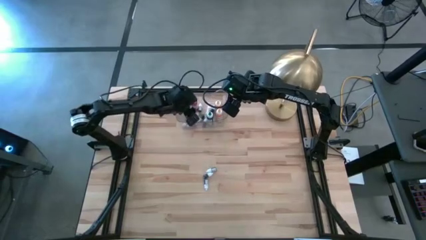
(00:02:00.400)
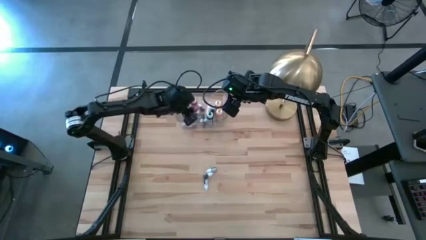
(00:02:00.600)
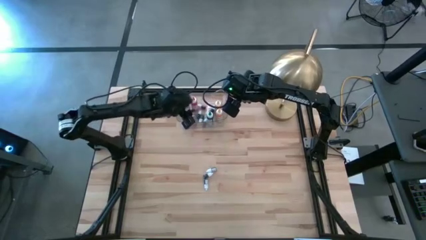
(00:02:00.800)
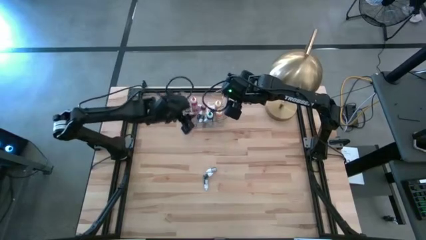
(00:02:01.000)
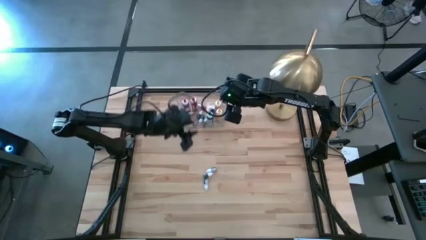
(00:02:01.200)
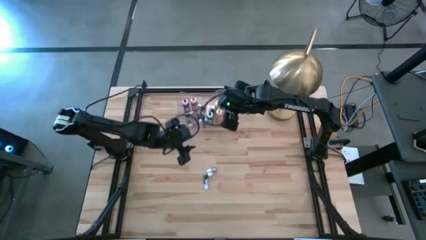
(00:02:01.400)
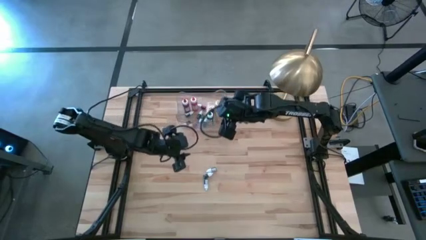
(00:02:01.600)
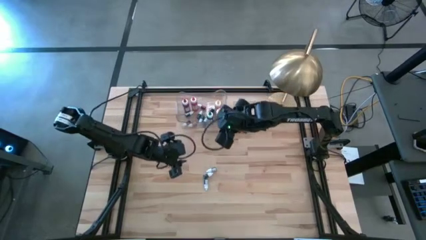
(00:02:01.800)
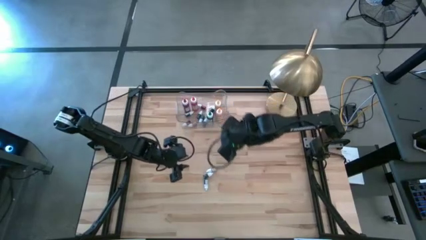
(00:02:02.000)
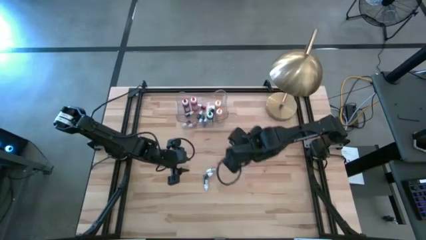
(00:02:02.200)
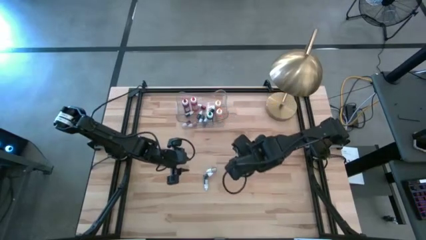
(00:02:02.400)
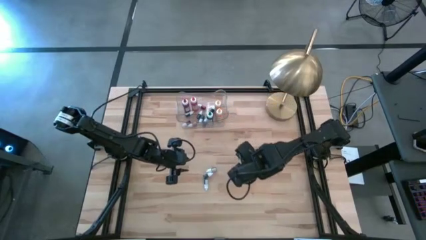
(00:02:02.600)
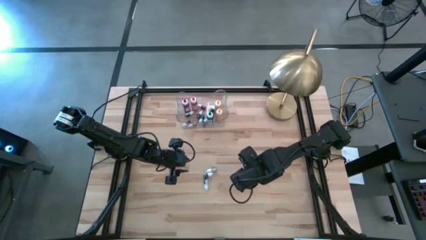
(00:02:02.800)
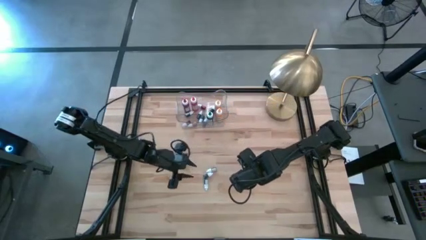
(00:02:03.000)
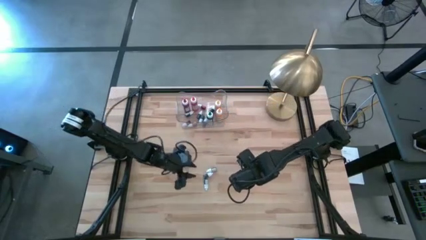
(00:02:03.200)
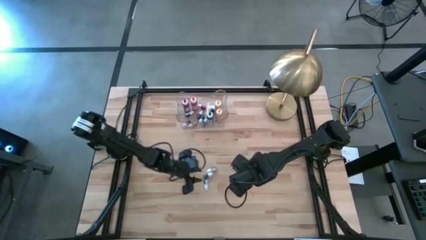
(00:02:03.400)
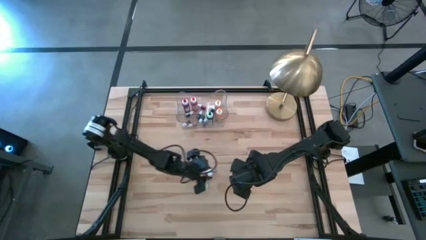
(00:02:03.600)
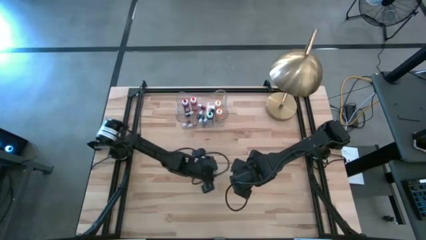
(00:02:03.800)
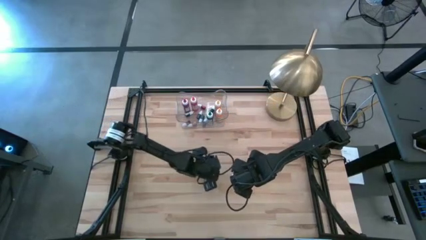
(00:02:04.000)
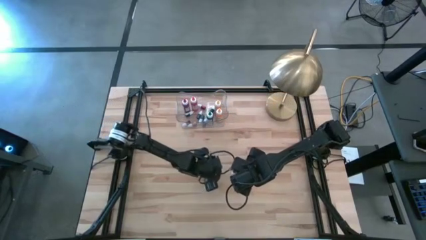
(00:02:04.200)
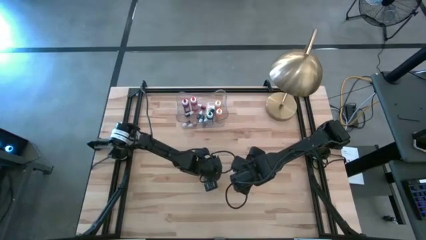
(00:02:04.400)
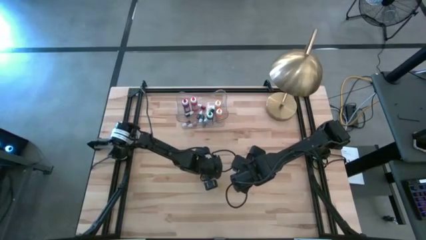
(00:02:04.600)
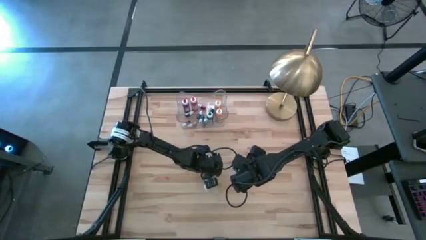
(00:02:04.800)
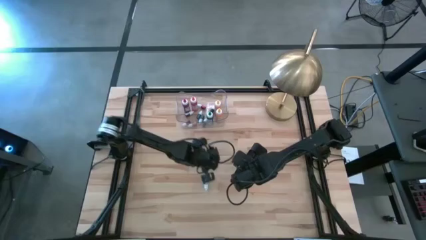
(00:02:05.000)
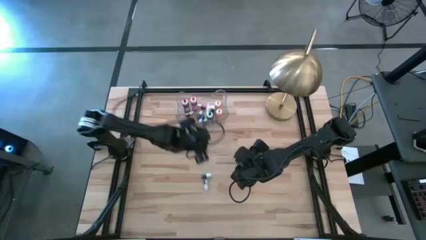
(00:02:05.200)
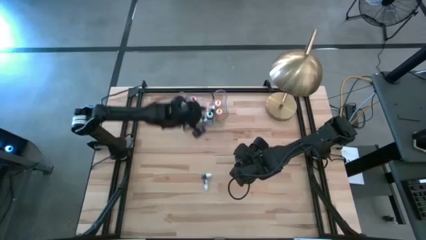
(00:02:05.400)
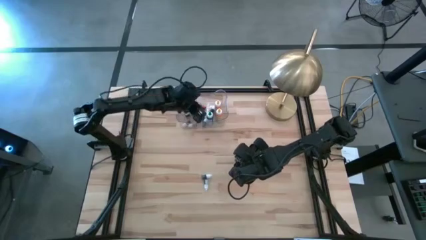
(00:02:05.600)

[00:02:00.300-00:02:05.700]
Task: Pick & Place food coloring
Put the small red food coloring bottle into the transparent bin

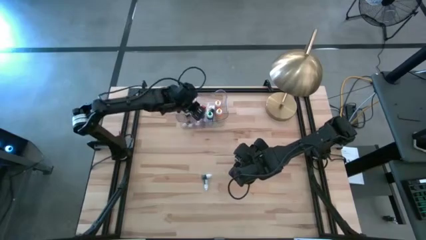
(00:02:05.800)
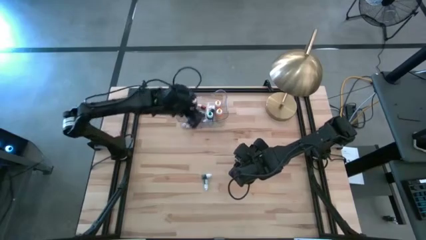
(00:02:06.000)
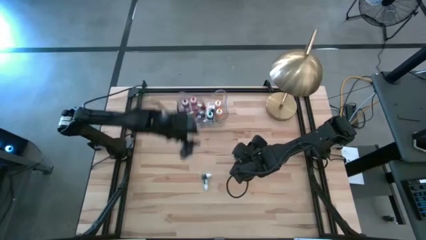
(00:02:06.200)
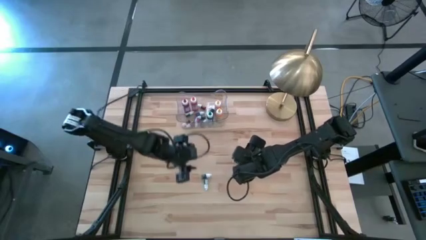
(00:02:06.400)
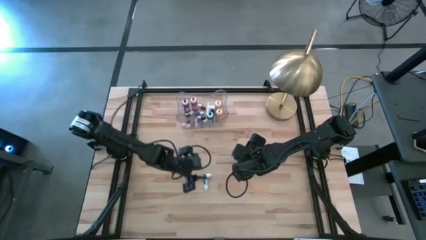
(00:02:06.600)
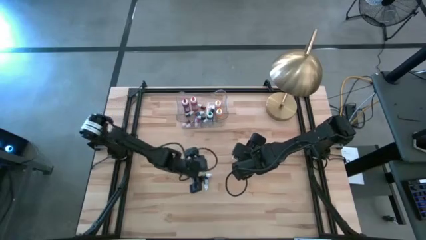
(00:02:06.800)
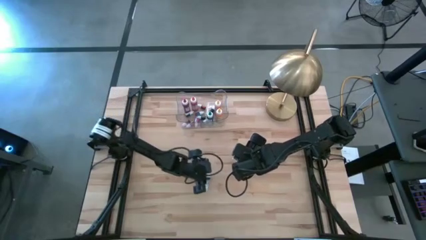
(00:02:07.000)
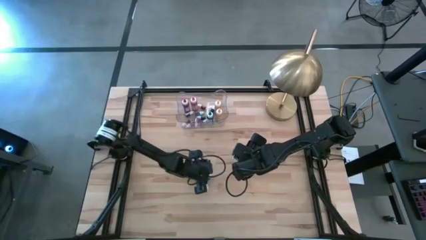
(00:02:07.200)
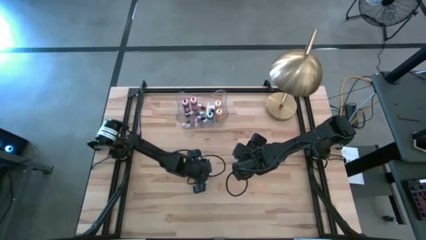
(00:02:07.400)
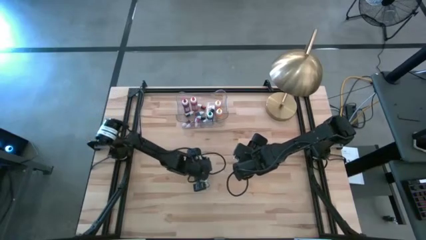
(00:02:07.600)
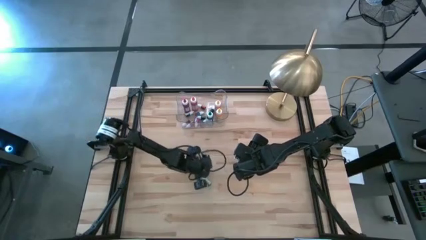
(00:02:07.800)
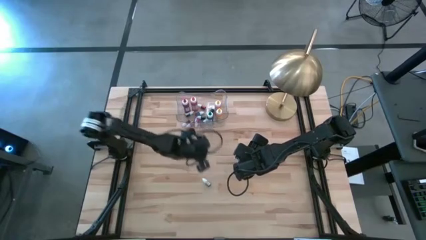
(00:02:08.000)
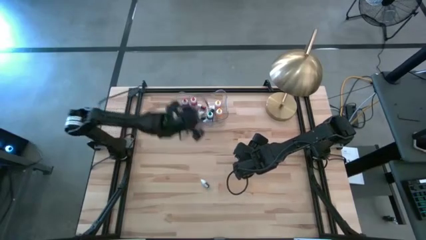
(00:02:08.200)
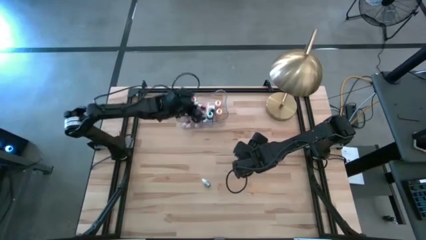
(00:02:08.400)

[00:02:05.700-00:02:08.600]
Put the small blue food coloring bottle into the transparent bin

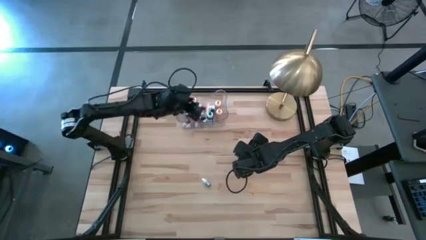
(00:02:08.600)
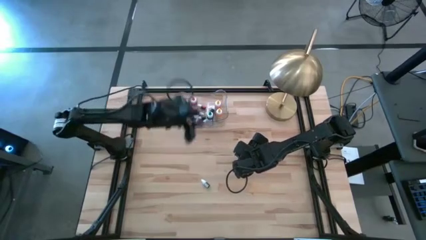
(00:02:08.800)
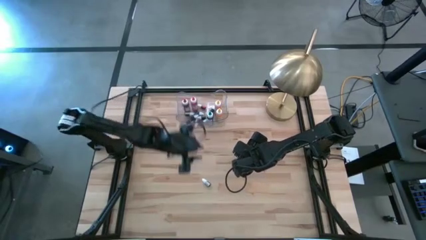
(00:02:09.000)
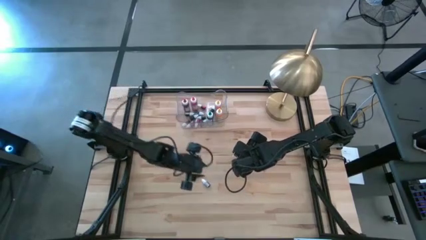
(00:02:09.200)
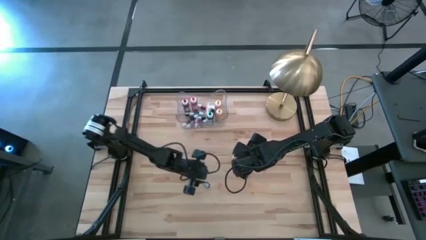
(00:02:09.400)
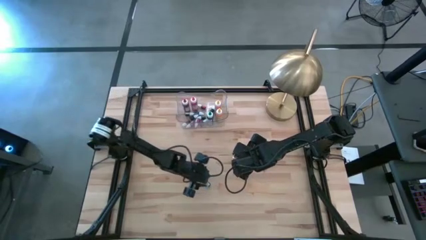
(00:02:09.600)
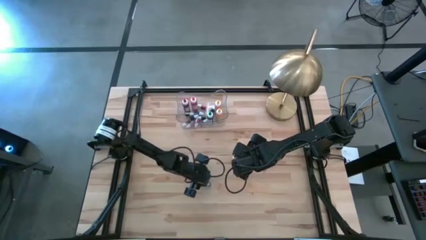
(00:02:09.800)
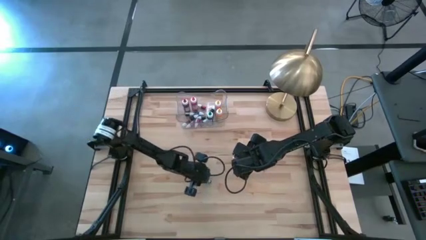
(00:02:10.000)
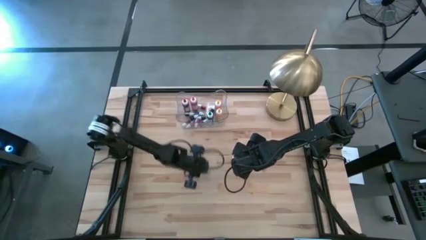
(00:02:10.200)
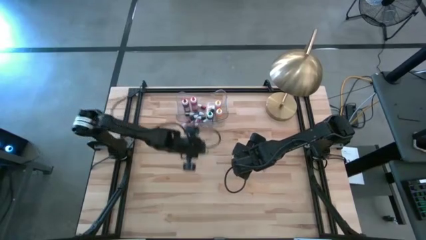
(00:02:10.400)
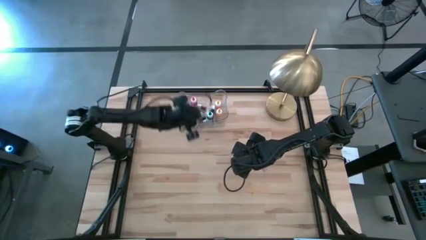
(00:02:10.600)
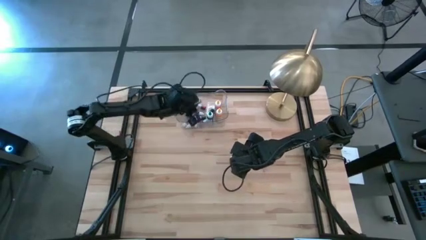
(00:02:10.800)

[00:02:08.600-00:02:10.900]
Put the black food coloring bottle into the transparent bin

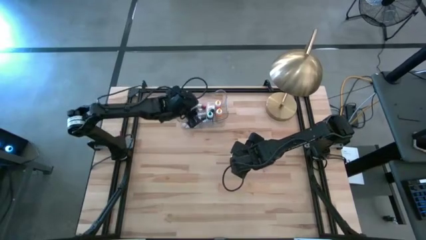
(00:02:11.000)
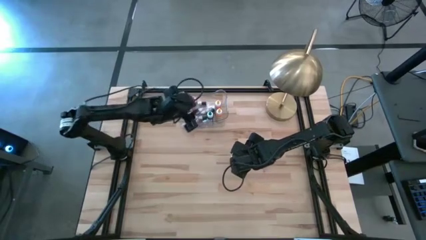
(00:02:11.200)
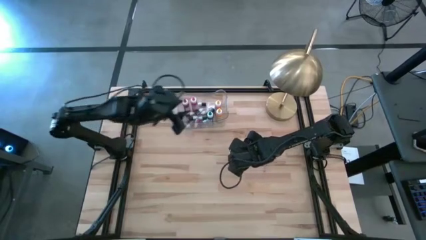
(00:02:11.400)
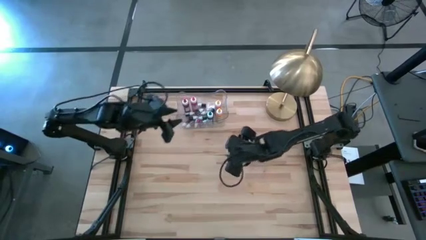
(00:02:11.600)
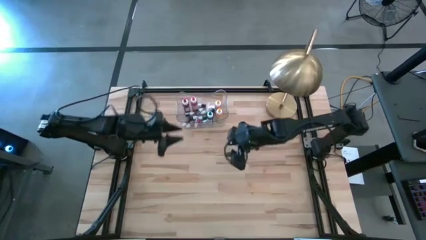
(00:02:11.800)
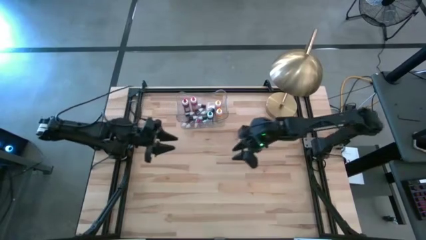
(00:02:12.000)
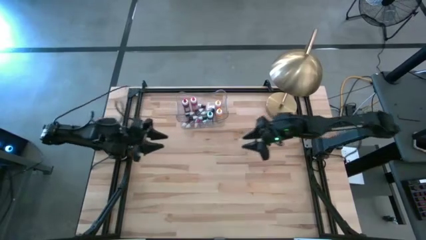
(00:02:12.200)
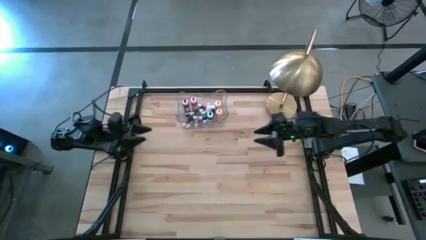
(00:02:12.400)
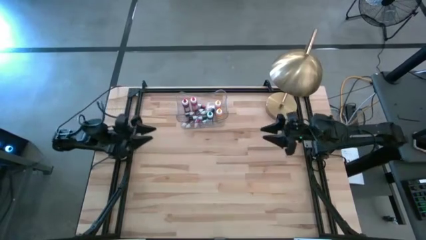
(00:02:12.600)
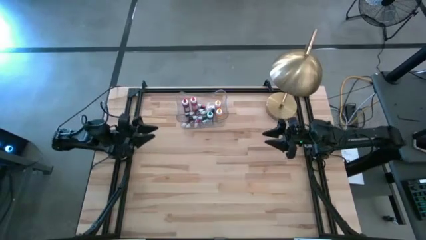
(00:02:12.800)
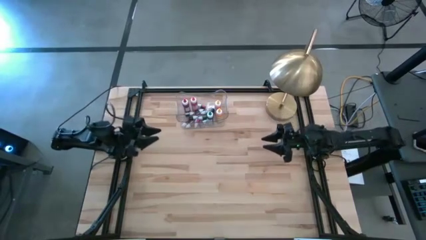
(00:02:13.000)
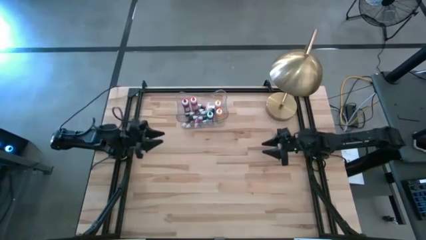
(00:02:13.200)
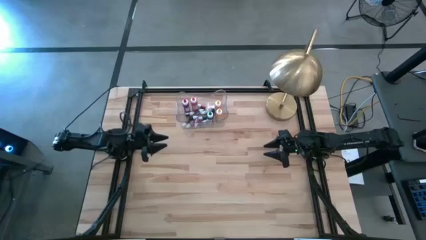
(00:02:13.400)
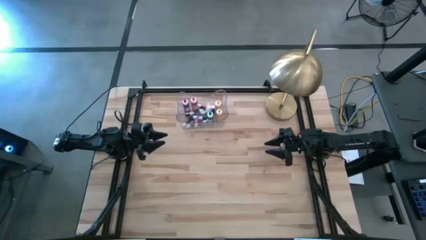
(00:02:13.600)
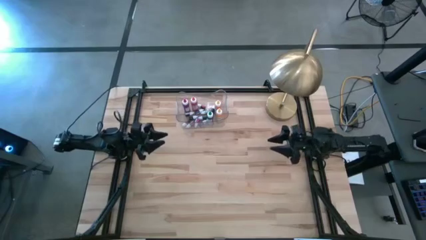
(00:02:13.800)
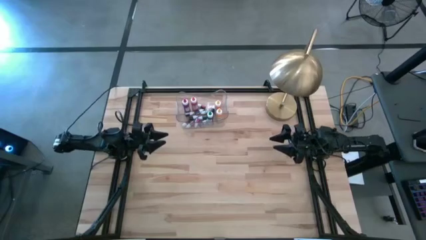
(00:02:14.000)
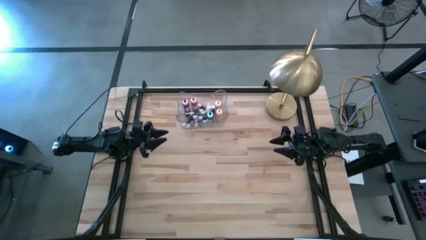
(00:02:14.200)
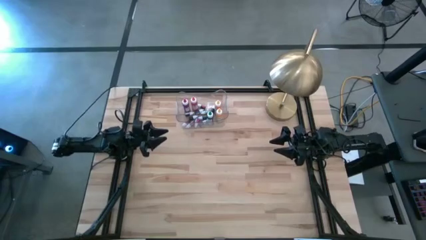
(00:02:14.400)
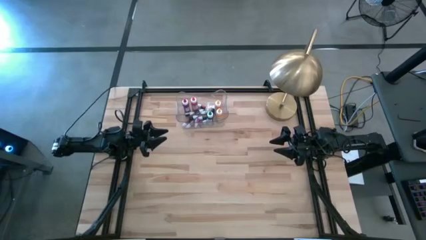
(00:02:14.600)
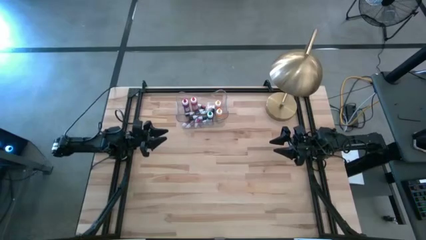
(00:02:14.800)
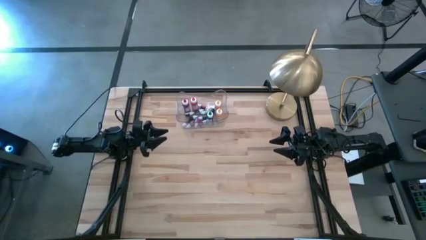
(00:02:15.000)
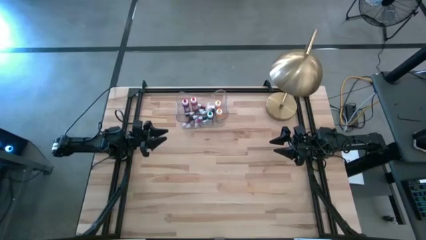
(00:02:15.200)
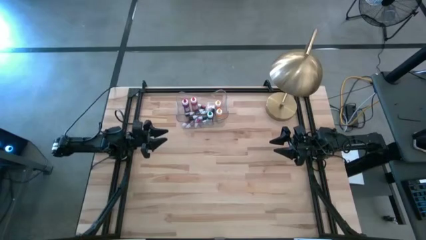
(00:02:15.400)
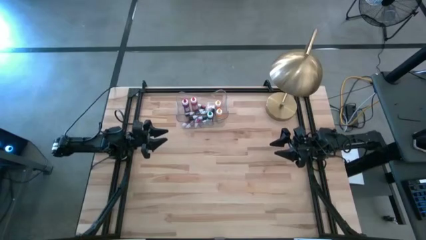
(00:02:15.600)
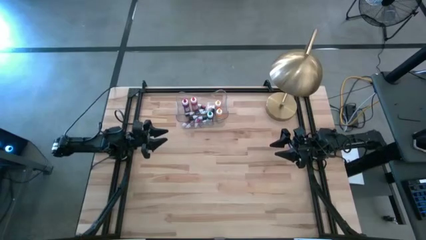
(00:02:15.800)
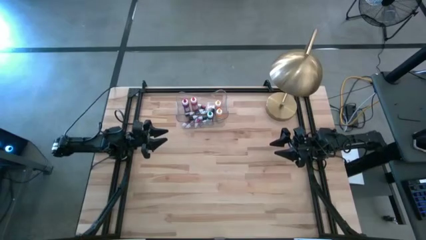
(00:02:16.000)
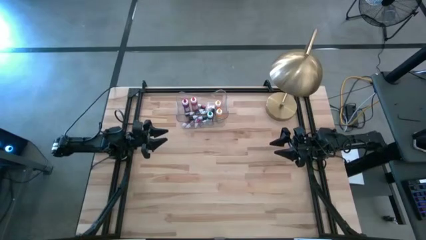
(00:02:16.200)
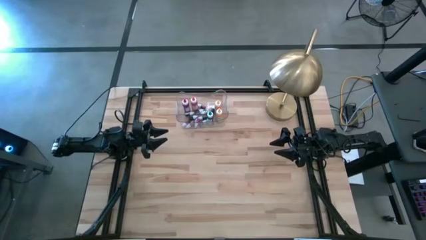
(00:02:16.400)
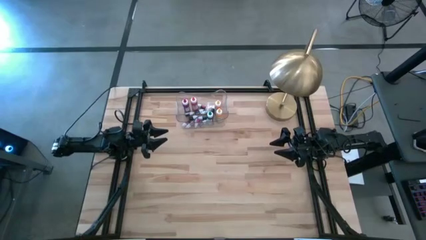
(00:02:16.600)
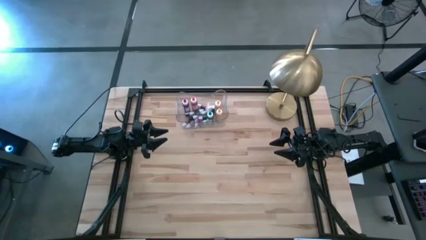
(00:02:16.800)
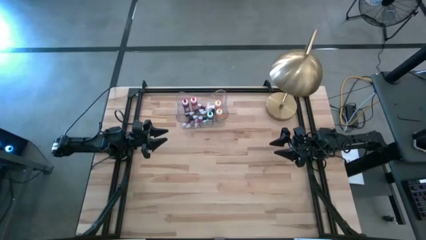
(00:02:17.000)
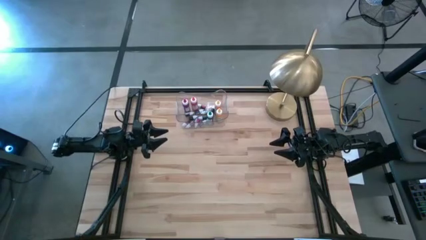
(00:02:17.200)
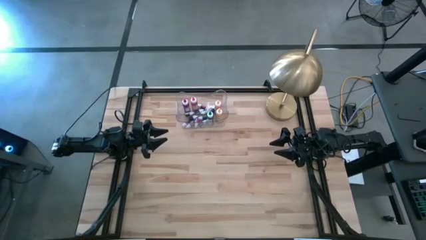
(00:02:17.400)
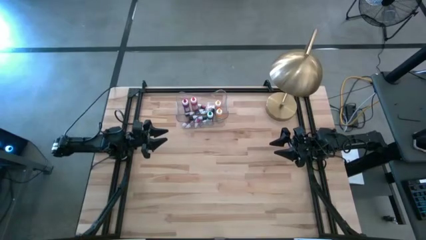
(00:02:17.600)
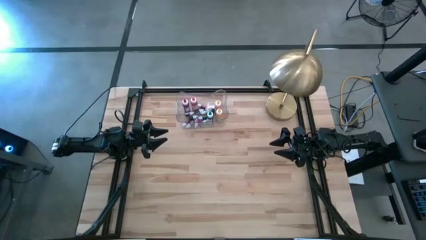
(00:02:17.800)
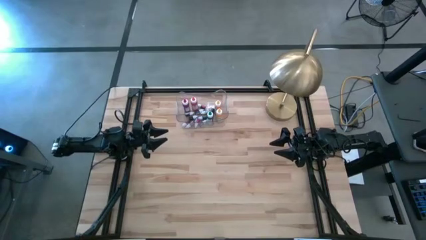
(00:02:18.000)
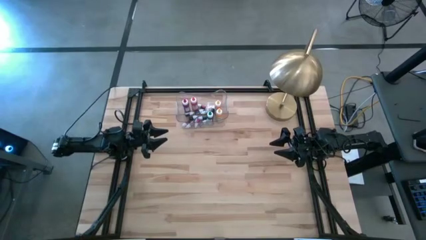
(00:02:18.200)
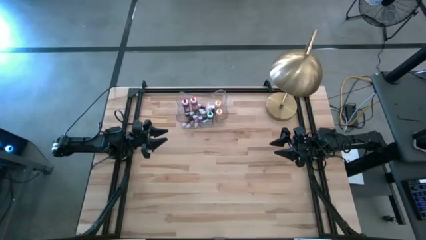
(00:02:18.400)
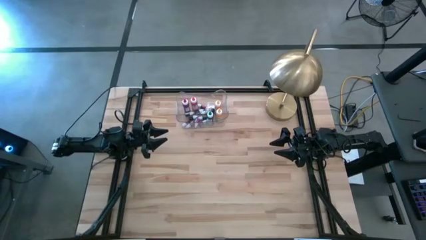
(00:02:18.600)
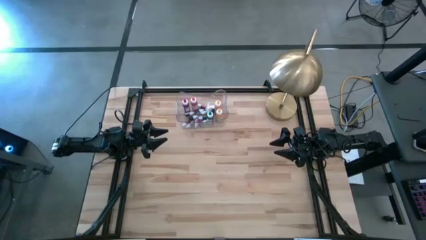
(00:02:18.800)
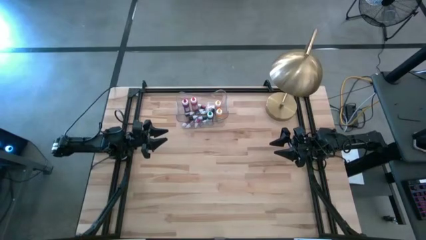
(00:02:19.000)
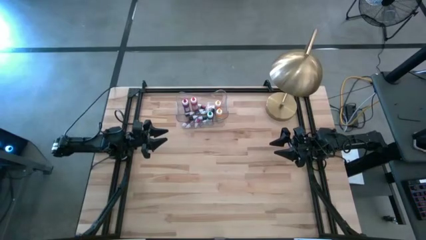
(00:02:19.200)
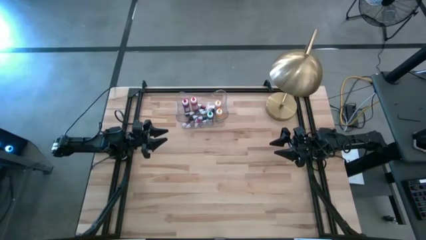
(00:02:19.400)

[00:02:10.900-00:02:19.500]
Return to Home Position
